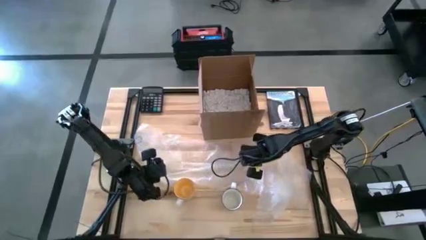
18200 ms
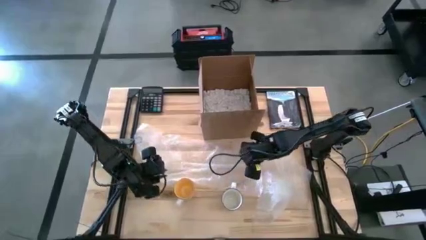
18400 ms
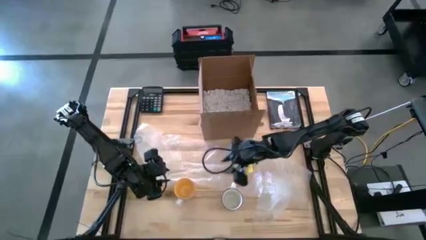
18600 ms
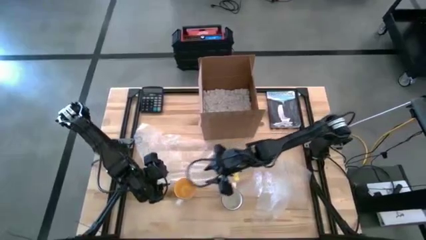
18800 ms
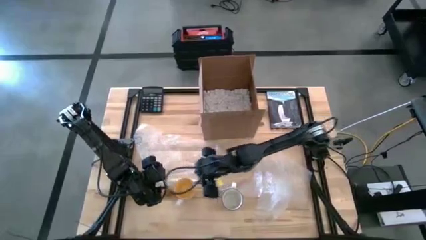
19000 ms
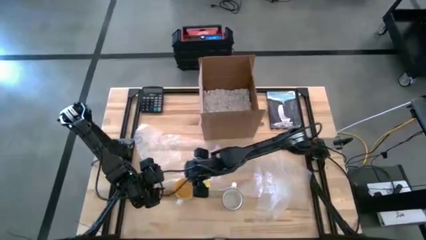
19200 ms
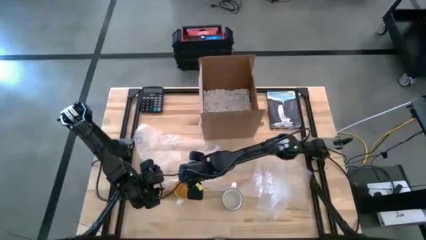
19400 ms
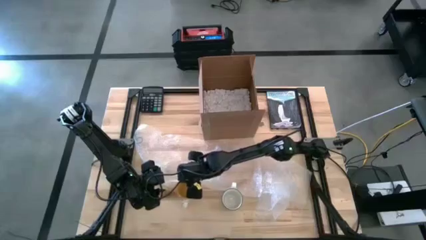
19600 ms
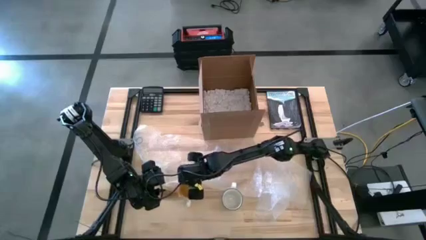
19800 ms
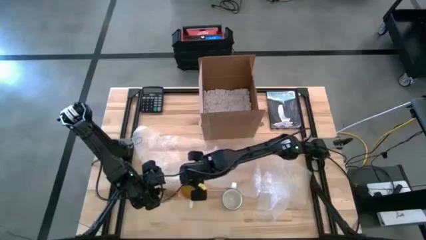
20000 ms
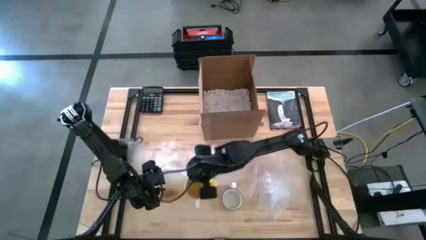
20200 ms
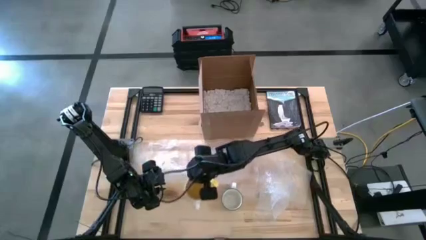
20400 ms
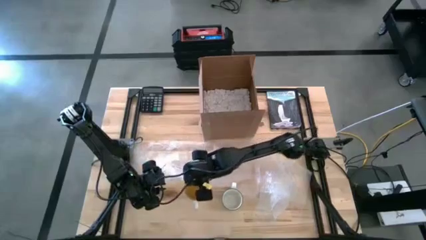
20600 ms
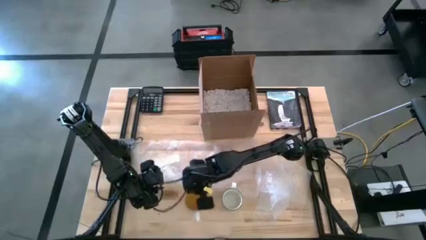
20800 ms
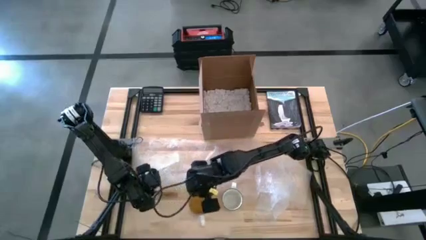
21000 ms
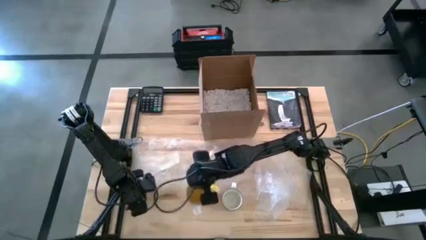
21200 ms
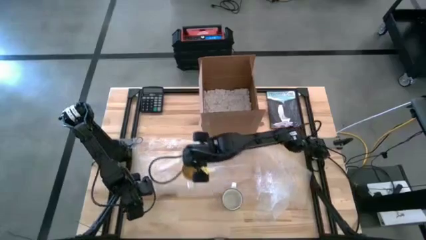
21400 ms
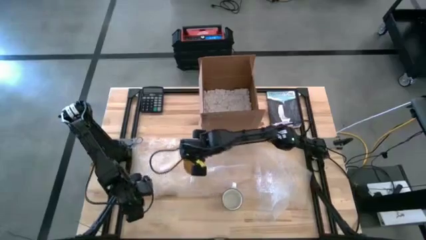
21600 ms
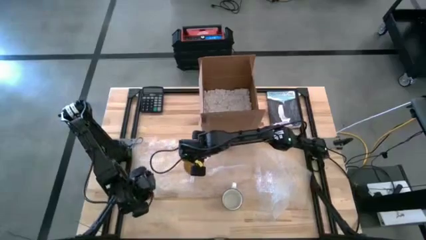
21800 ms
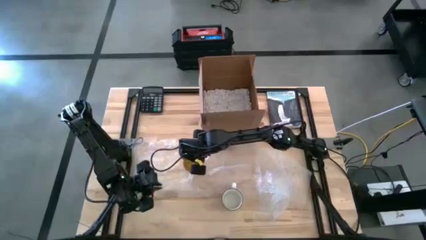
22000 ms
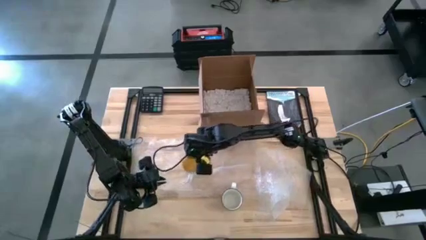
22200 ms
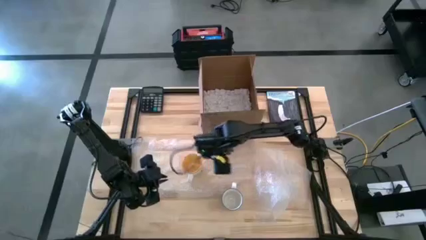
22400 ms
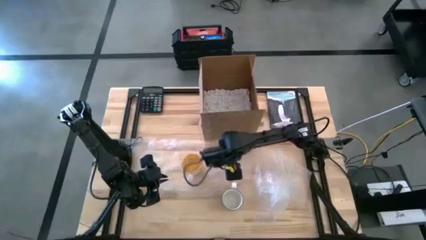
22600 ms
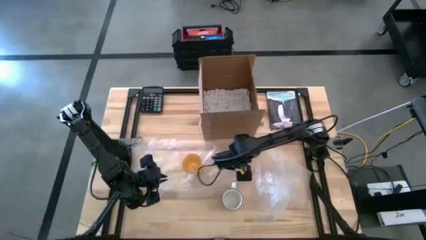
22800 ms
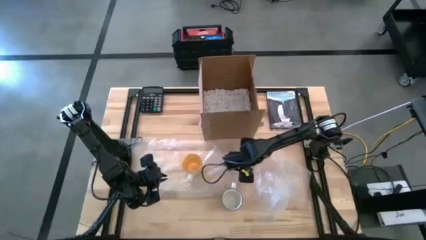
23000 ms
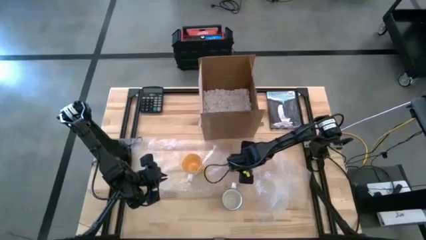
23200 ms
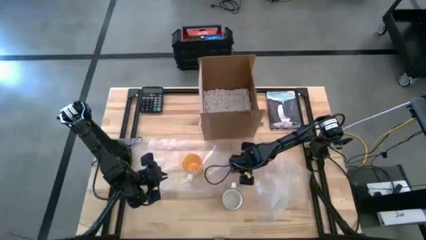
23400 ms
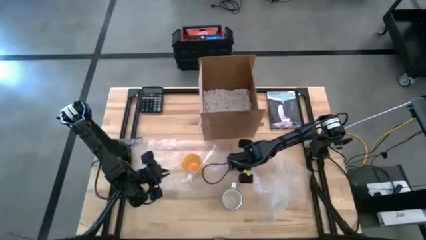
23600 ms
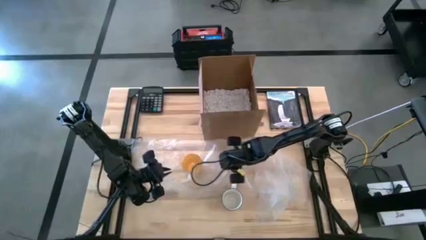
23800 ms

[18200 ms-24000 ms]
Task: wrap mug
Wrap the yellow mug in bubble wrap

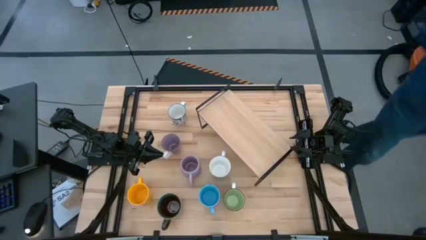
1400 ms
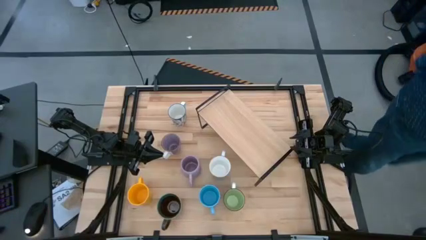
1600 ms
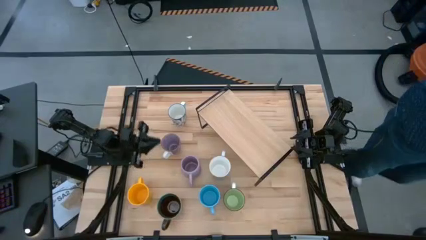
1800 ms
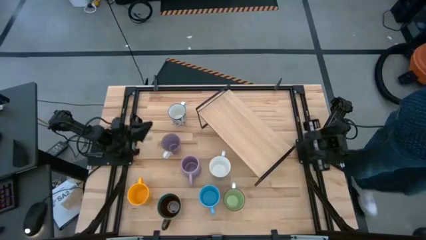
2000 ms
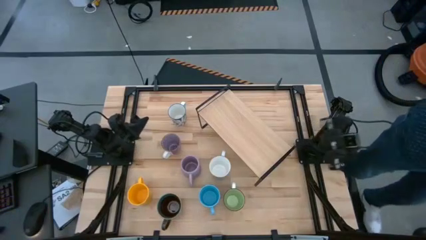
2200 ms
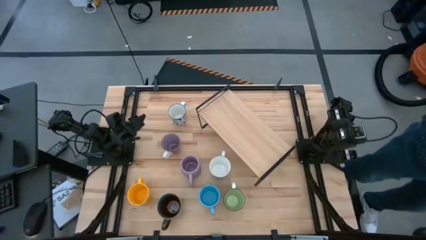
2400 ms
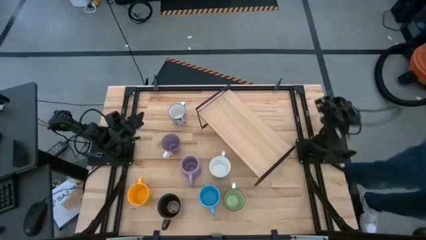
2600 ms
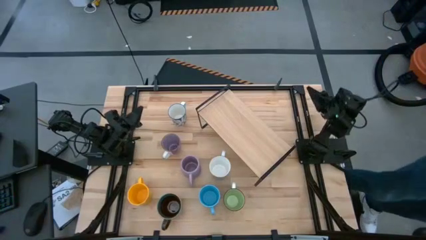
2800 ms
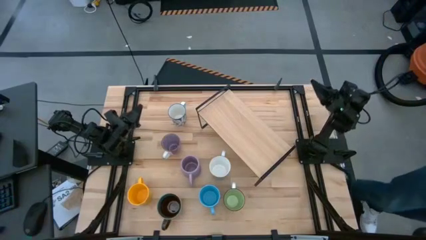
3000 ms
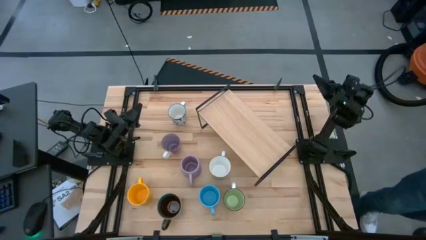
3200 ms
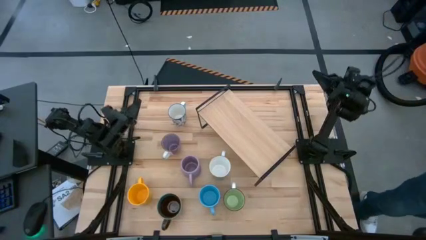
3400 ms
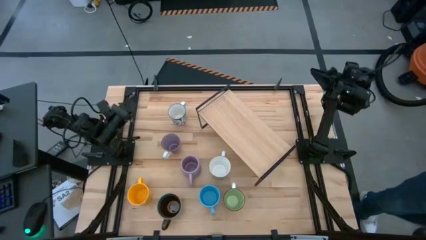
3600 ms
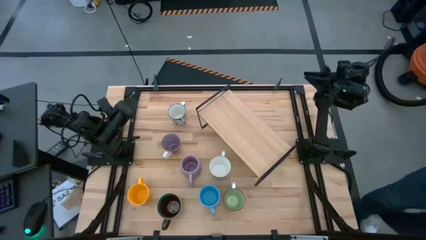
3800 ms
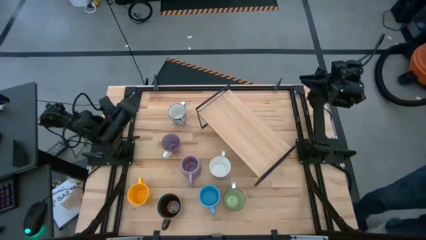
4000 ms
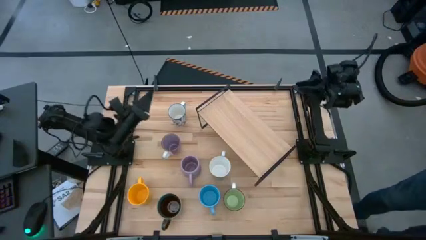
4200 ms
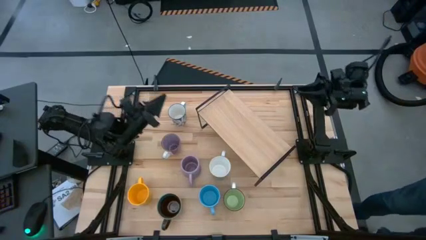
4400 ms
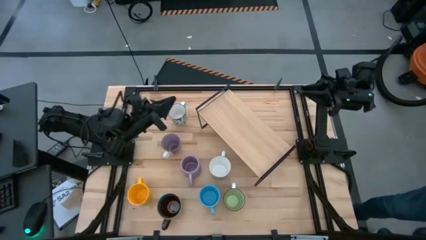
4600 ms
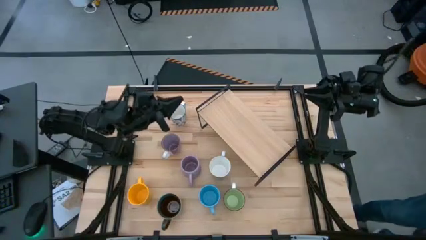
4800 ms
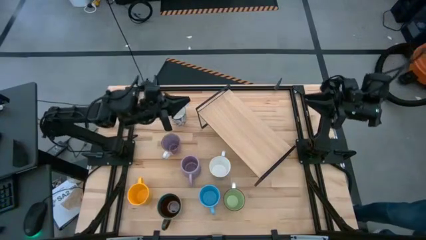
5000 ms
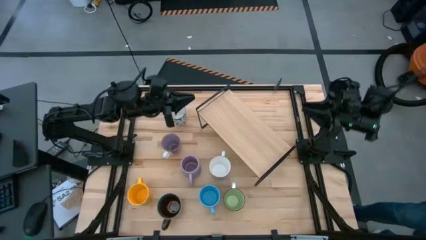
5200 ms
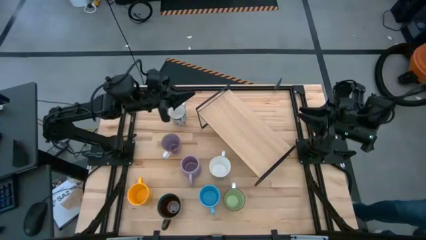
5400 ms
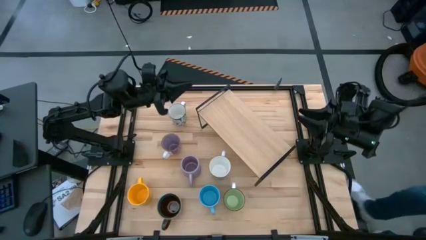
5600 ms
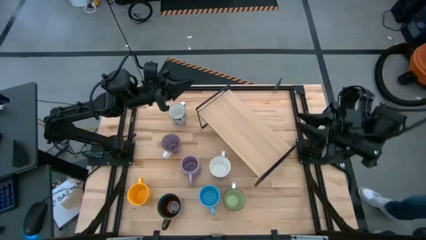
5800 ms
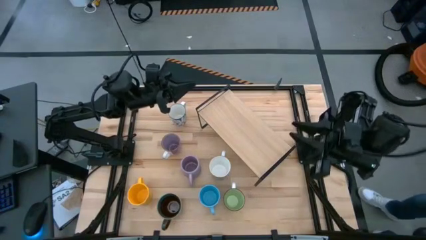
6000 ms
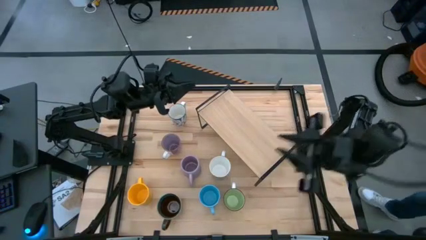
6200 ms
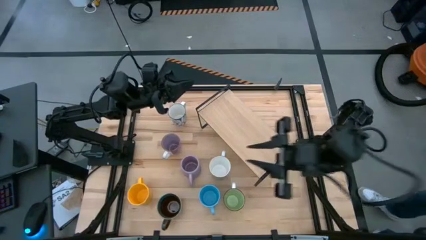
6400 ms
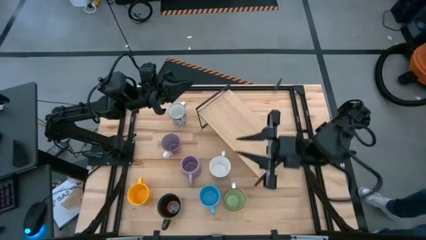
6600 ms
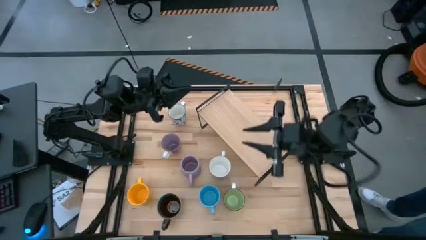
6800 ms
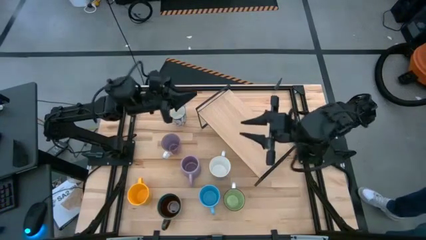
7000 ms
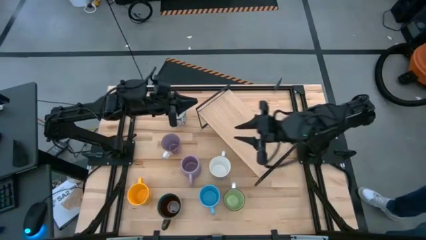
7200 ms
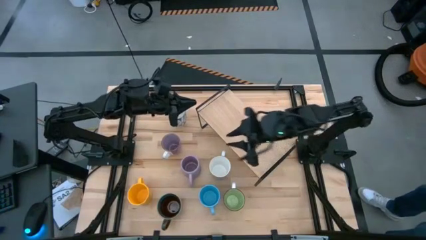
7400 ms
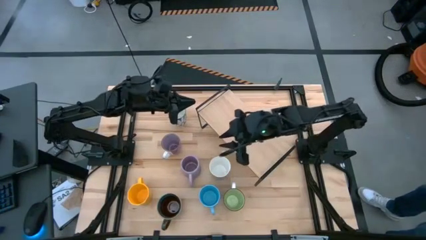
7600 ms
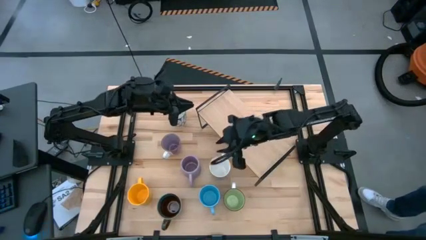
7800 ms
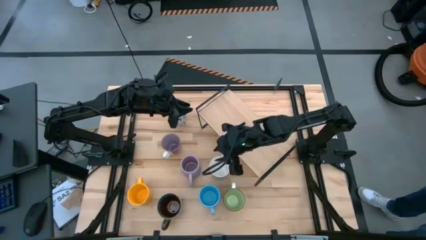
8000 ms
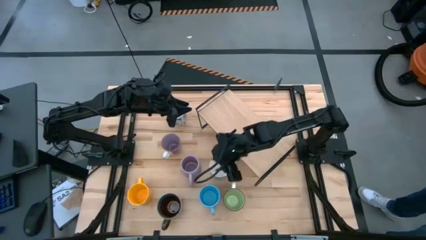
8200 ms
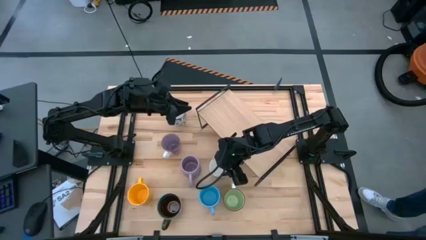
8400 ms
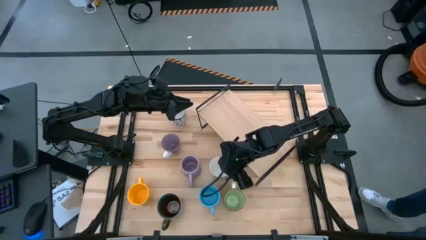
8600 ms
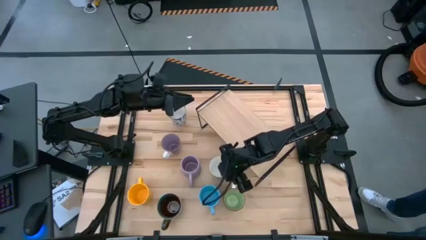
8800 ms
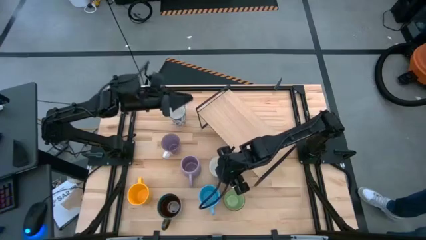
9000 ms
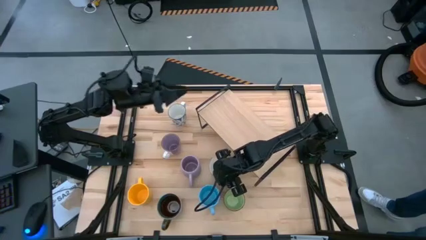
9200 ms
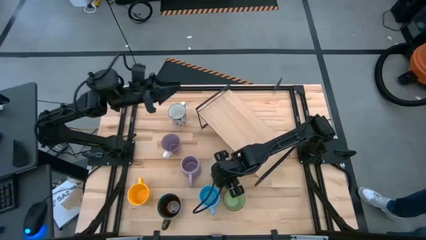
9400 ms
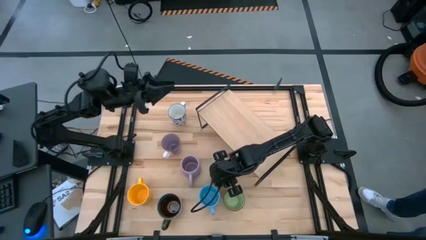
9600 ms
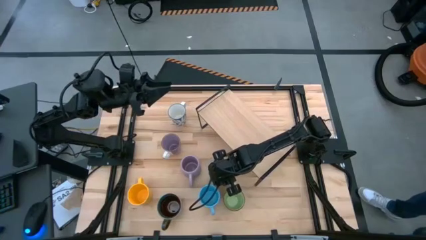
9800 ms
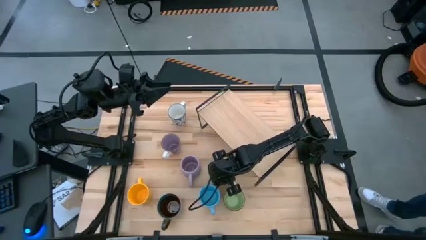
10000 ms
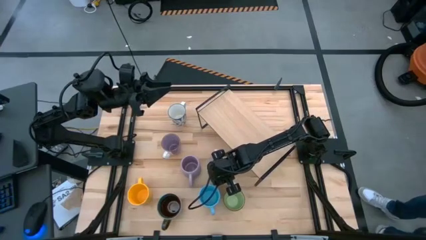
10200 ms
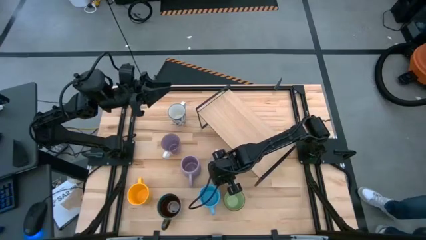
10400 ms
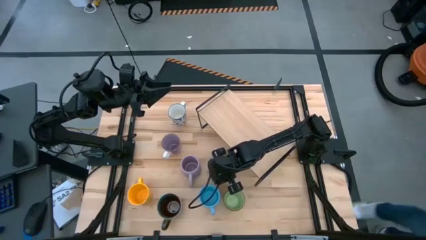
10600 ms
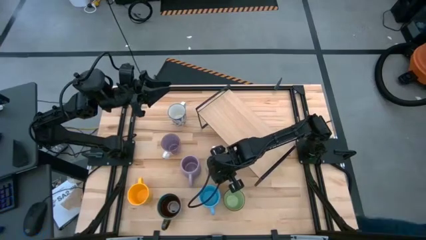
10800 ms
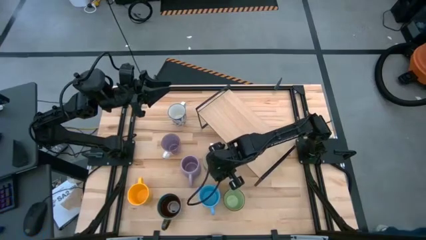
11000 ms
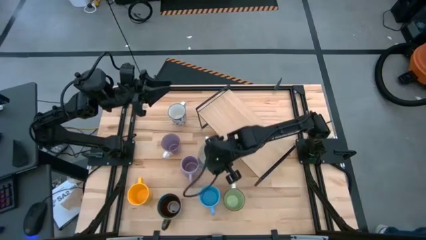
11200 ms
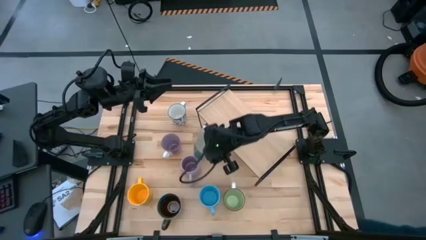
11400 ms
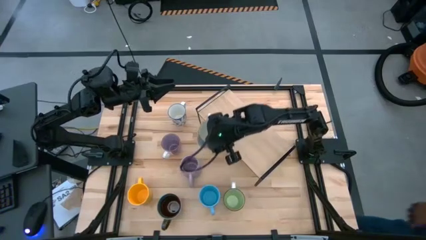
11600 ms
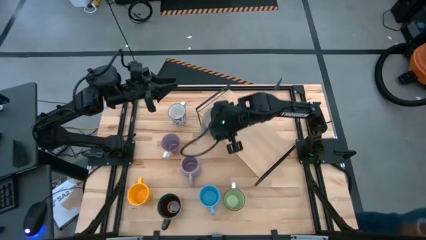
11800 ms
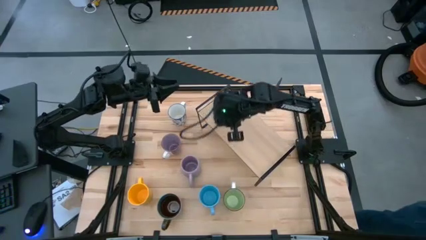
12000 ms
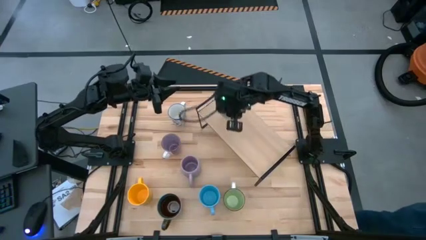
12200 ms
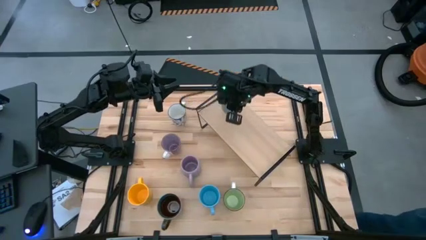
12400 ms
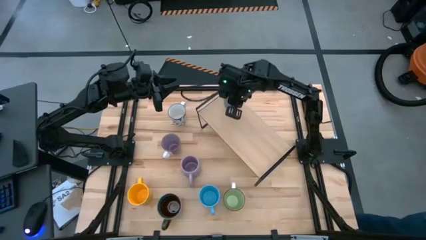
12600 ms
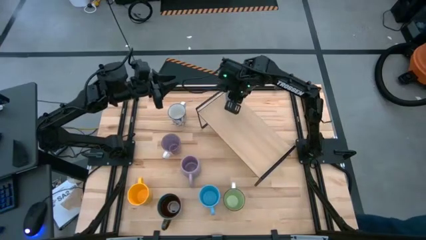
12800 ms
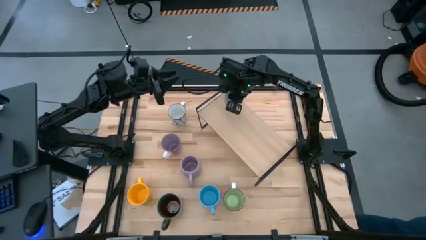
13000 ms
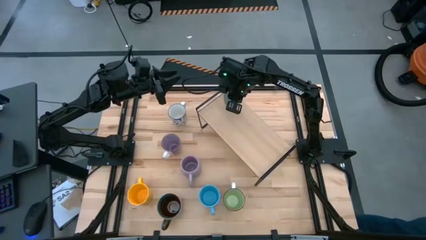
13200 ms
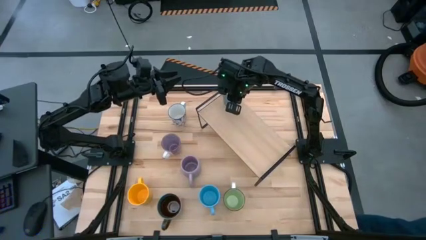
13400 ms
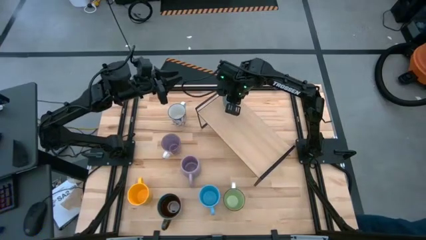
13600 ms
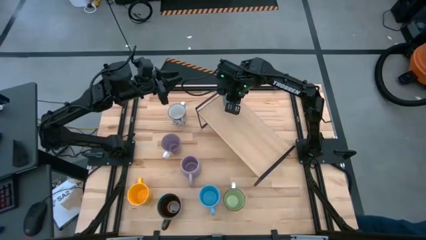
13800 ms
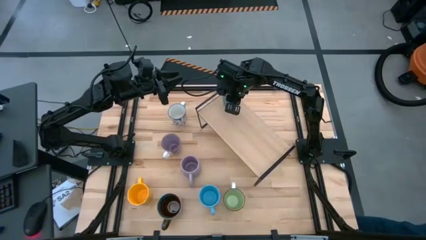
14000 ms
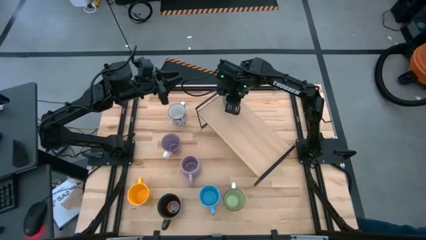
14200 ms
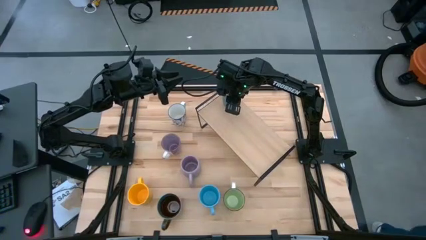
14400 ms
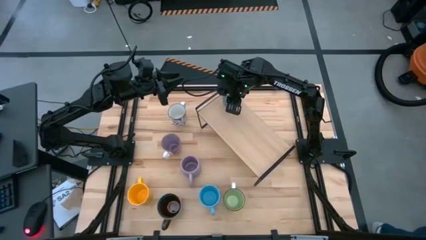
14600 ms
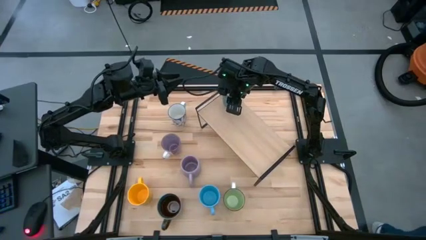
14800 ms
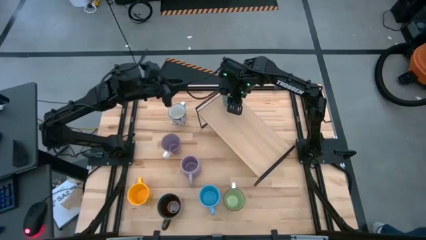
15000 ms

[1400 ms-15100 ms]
Task: Place coffee mugs
Put the blue mug on the shelf
